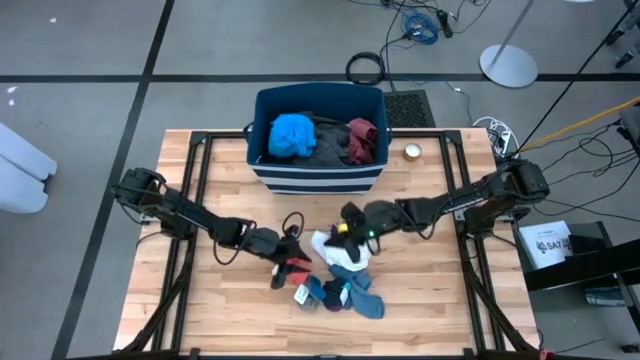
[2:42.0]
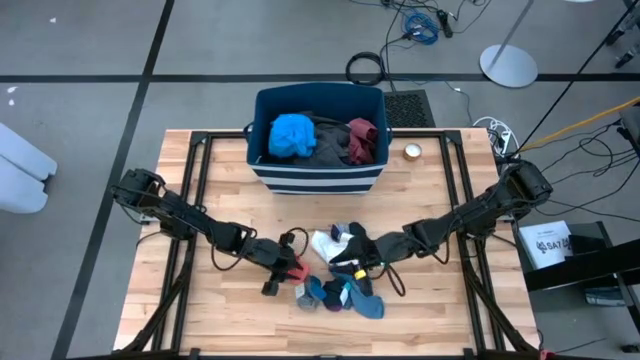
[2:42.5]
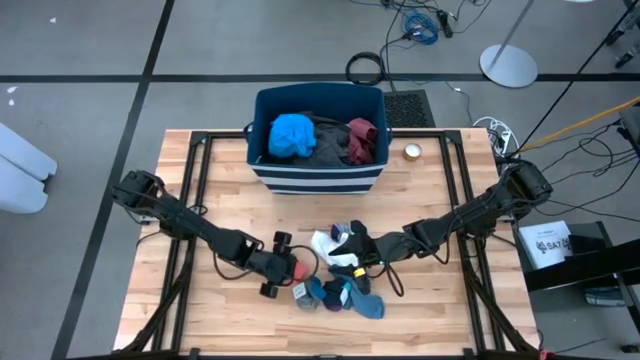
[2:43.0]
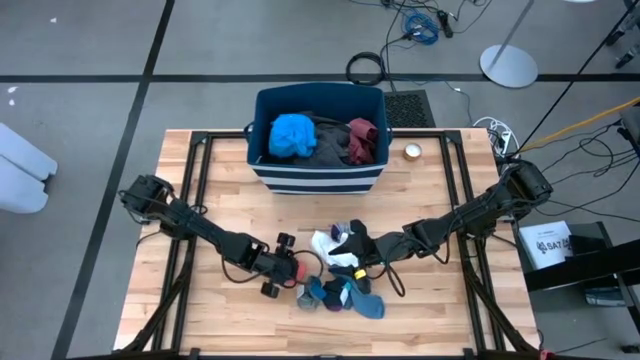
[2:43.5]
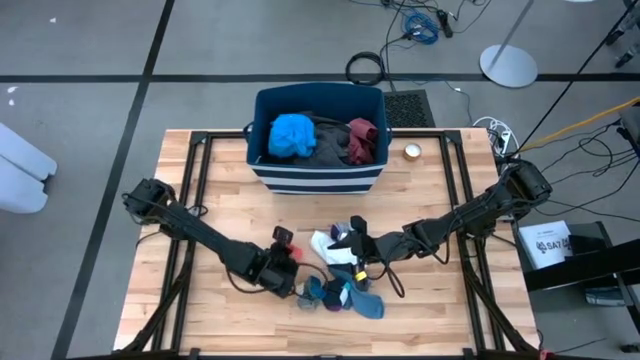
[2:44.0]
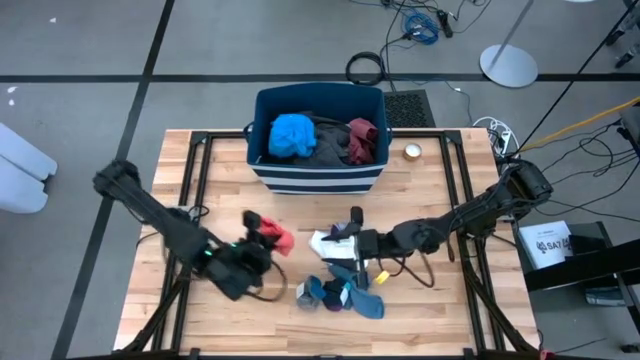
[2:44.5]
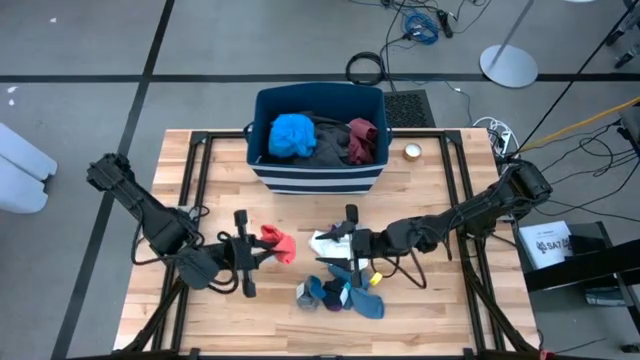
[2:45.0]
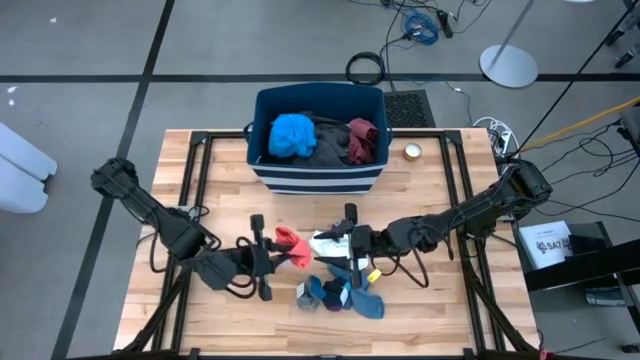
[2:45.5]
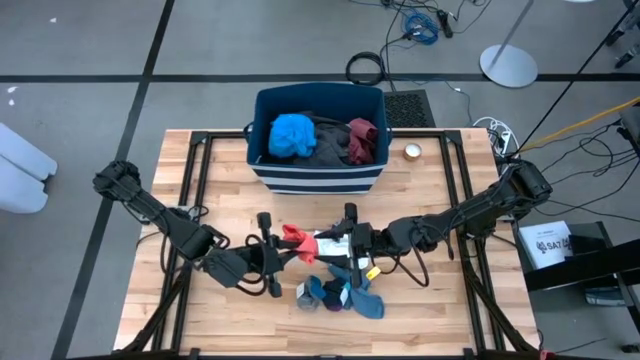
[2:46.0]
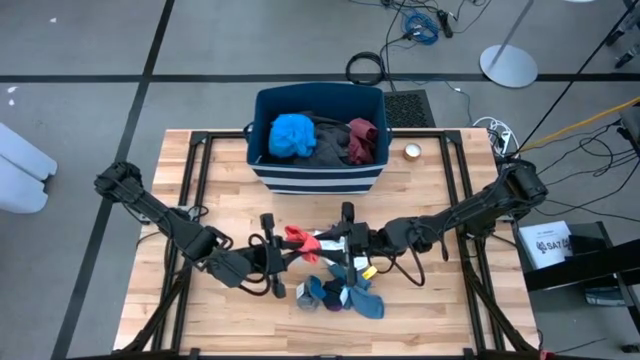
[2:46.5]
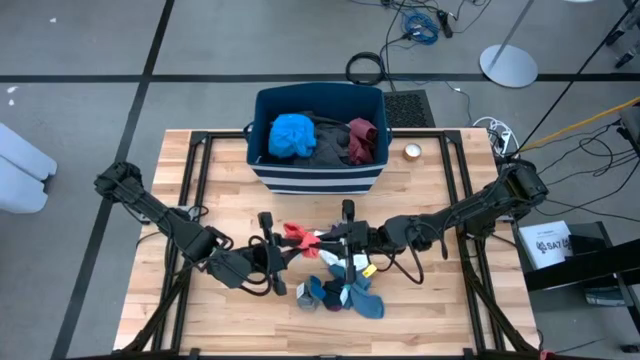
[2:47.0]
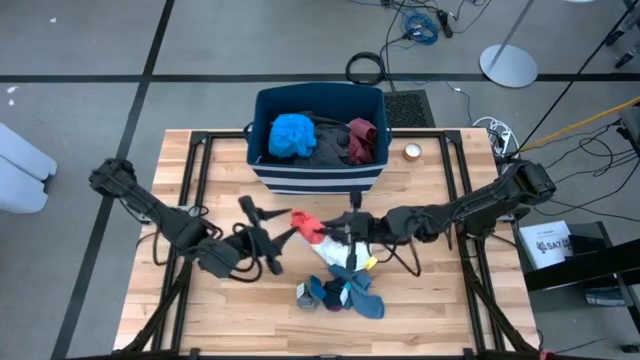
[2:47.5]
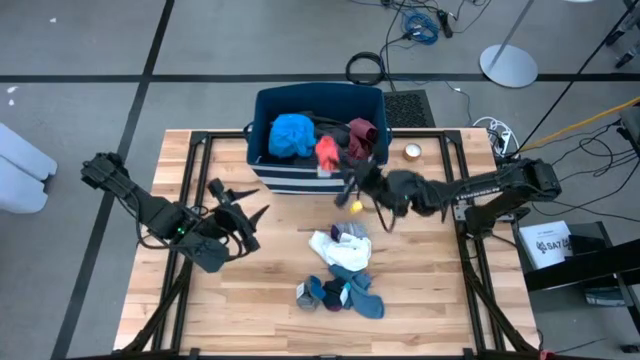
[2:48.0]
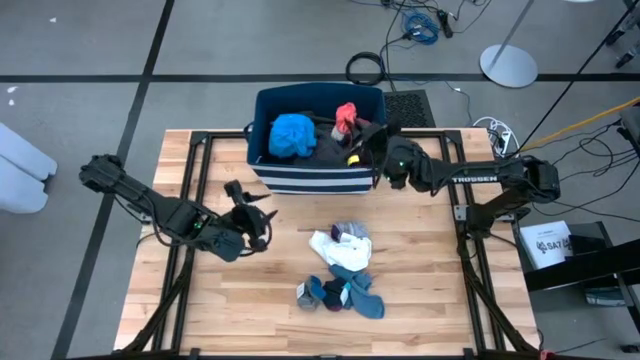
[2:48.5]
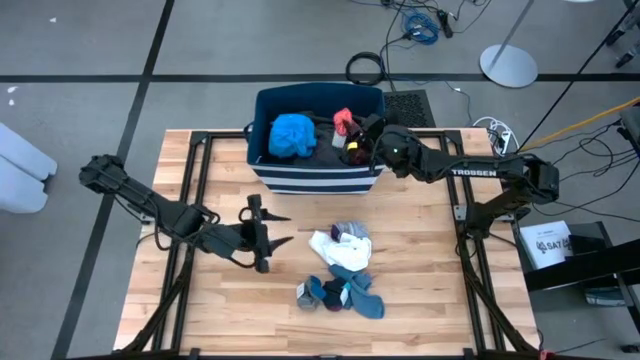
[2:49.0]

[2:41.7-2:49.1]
Task: Sort clothes
Put the orange sock into the blue laundry bin

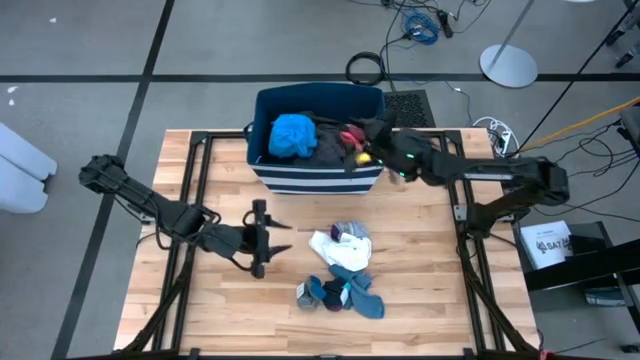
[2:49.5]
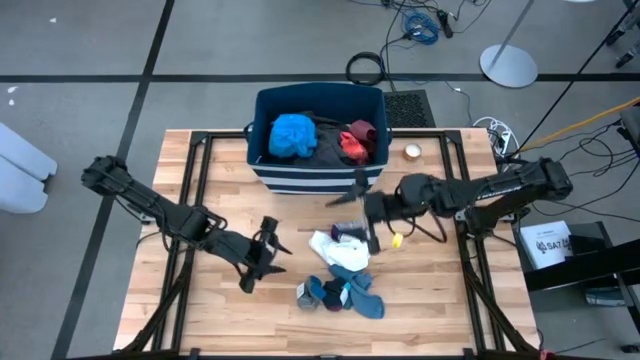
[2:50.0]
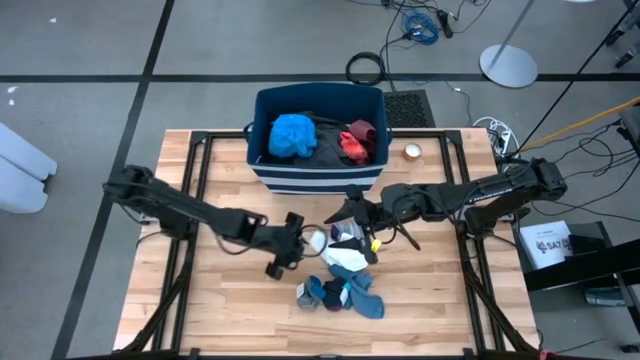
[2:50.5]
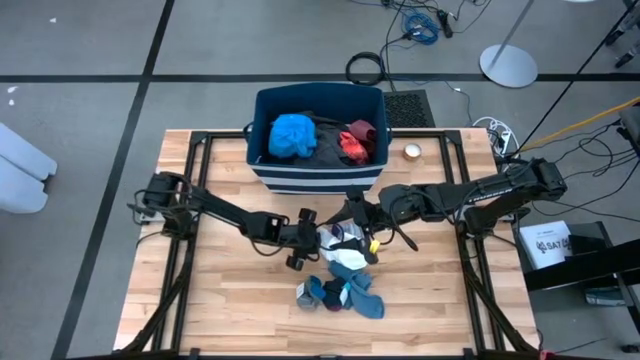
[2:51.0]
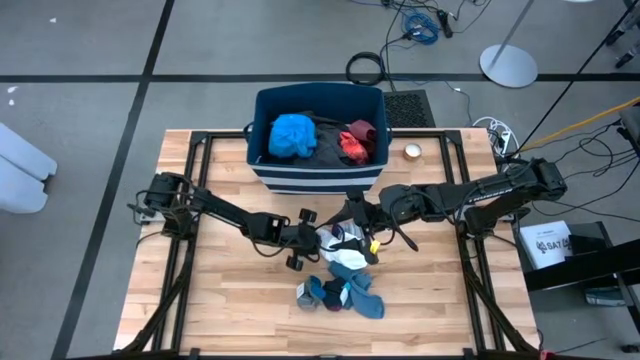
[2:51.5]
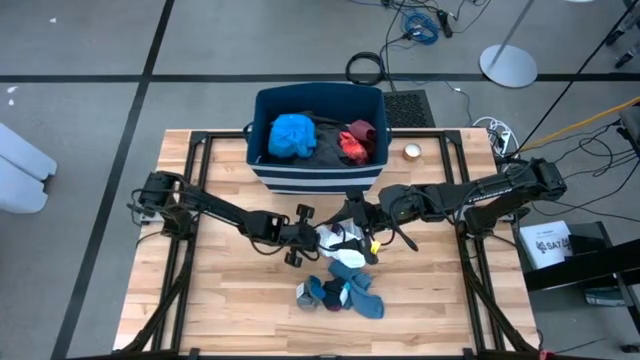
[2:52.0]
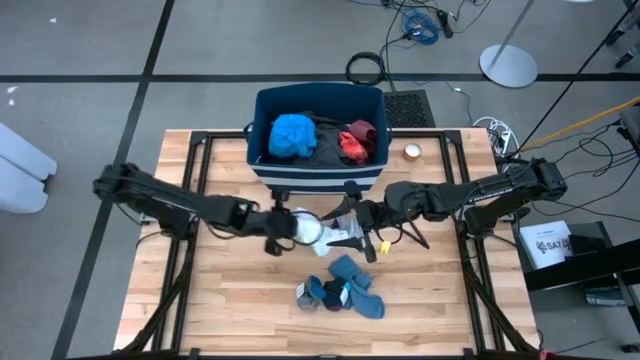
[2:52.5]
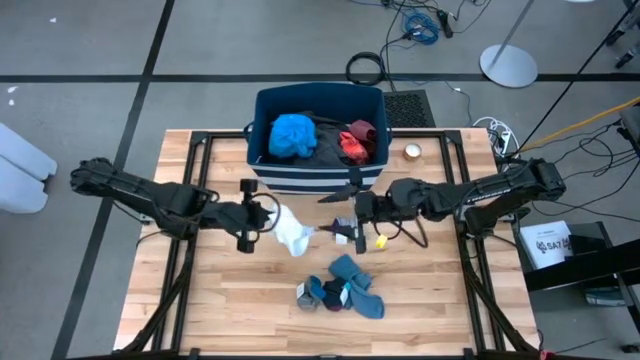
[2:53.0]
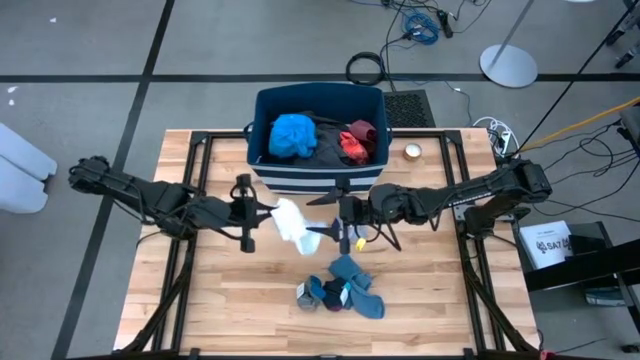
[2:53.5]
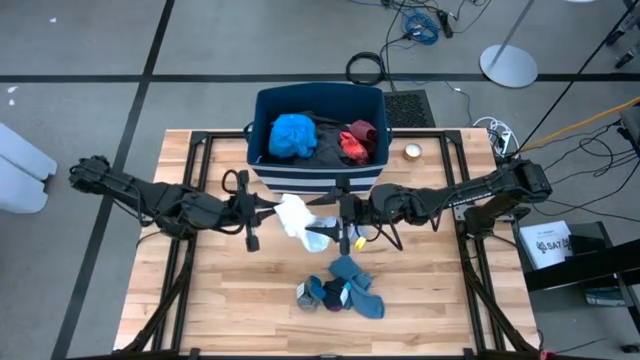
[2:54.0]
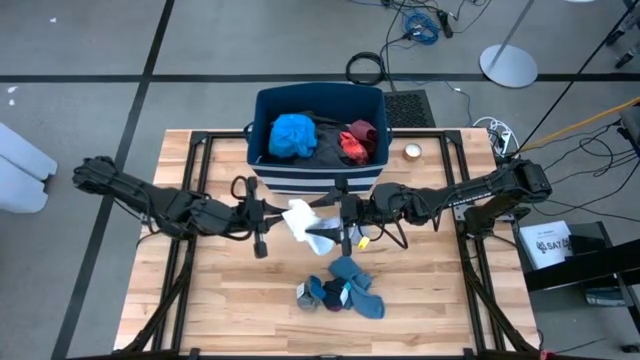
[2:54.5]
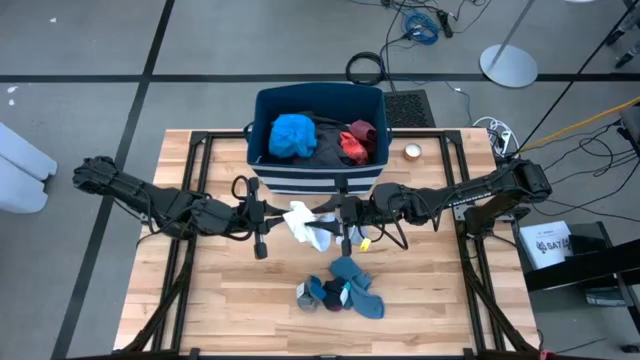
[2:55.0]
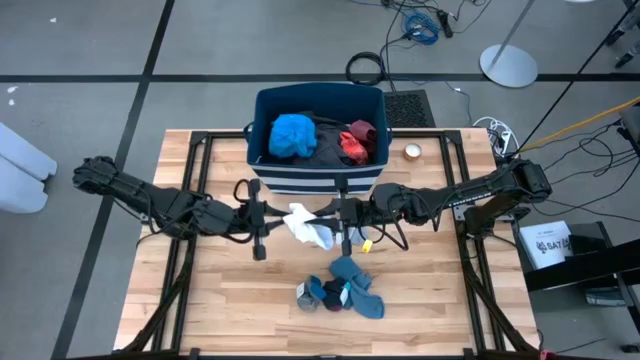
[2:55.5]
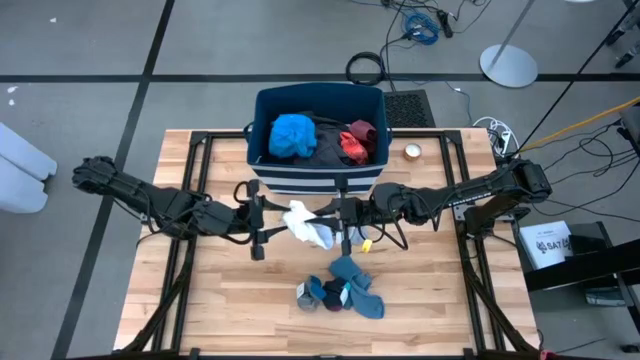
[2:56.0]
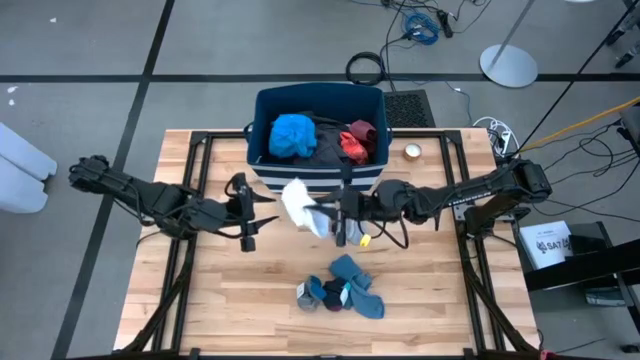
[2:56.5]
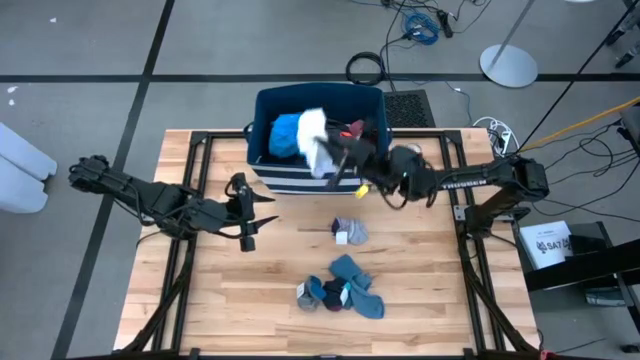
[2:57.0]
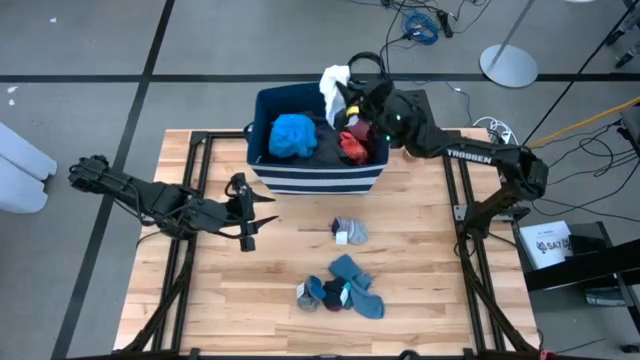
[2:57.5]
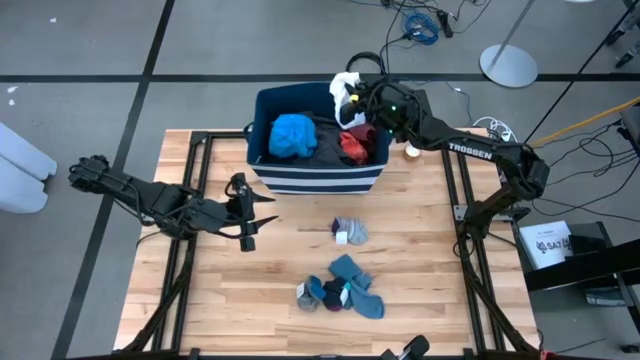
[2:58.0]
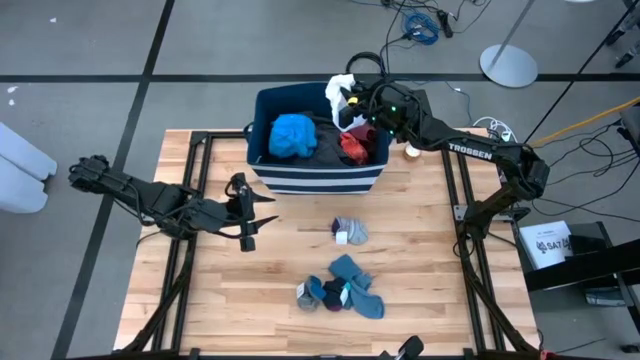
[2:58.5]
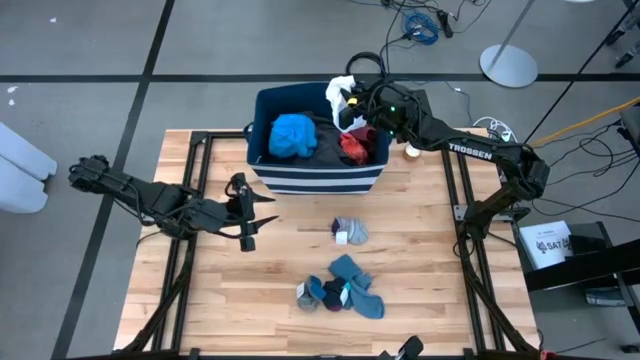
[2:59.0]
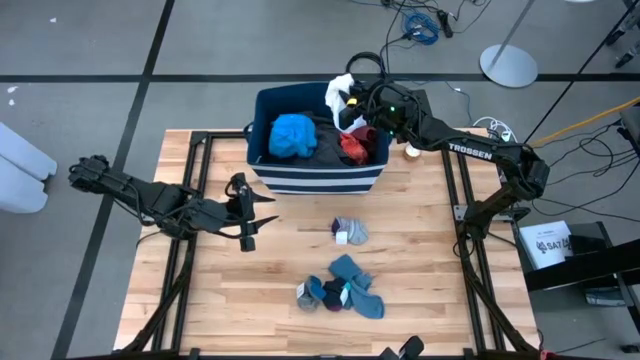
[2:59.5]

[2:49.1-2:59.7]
Put the white sock into the blue laundry bin

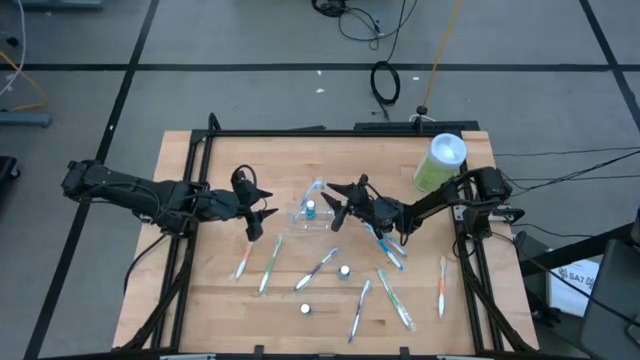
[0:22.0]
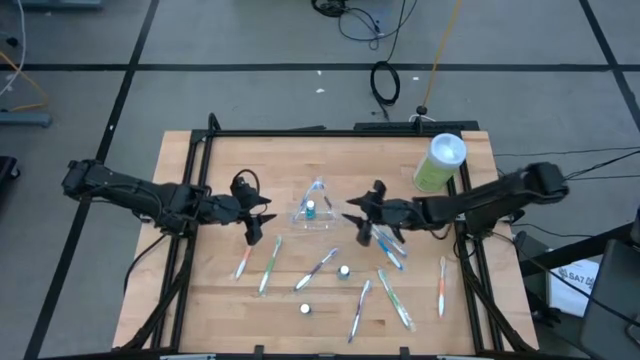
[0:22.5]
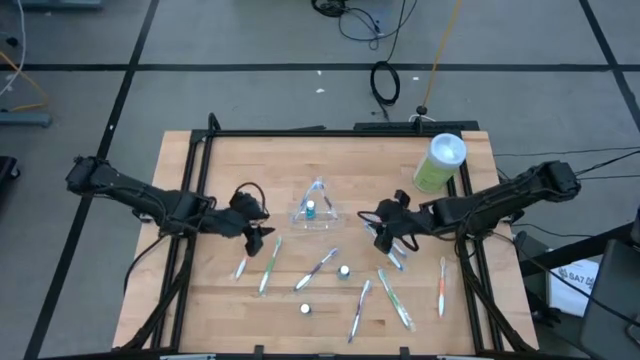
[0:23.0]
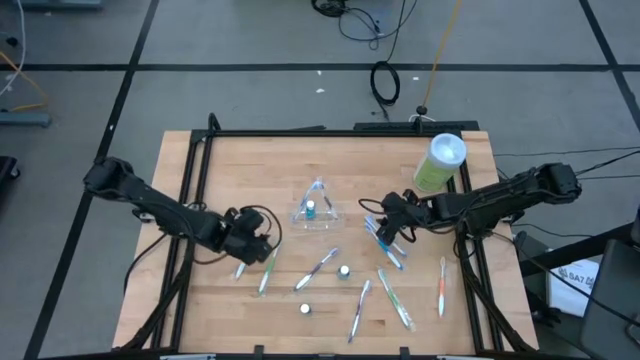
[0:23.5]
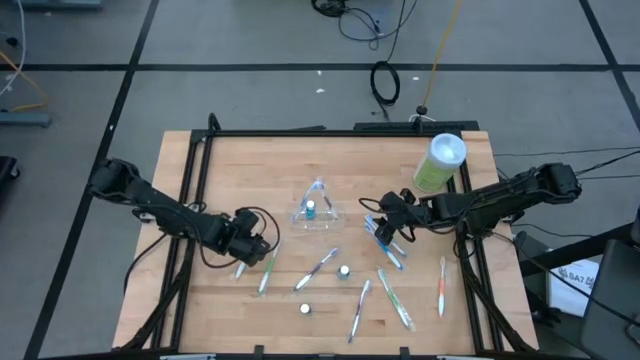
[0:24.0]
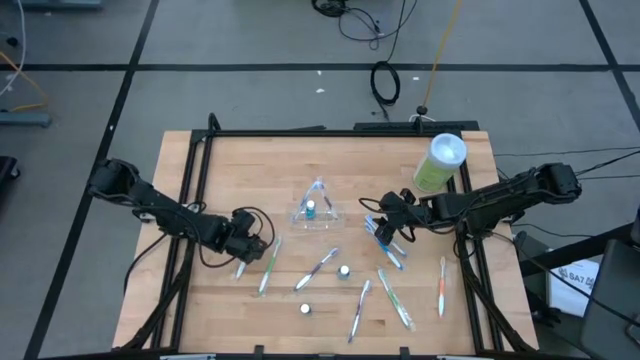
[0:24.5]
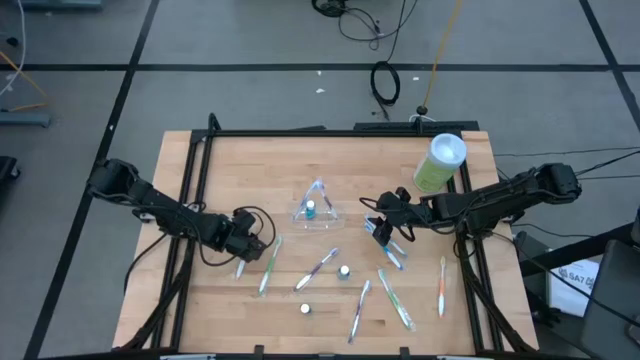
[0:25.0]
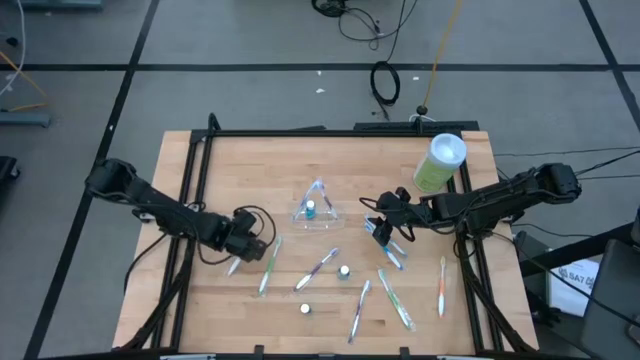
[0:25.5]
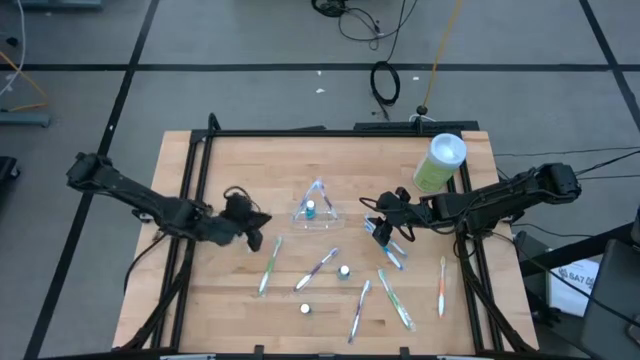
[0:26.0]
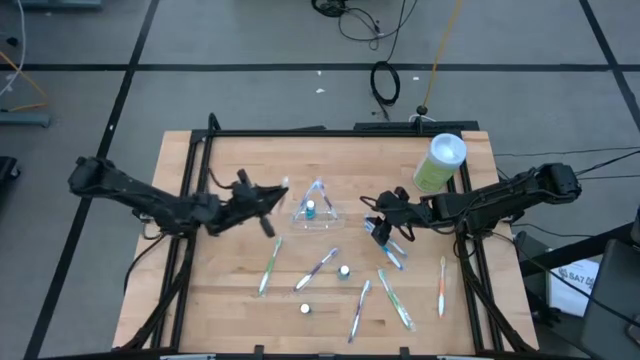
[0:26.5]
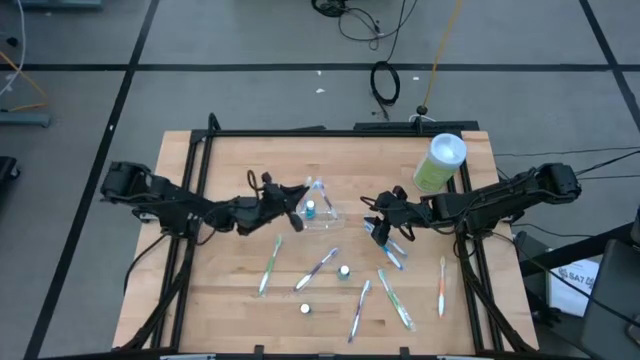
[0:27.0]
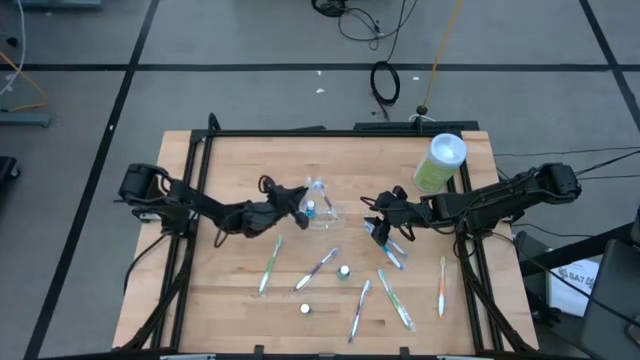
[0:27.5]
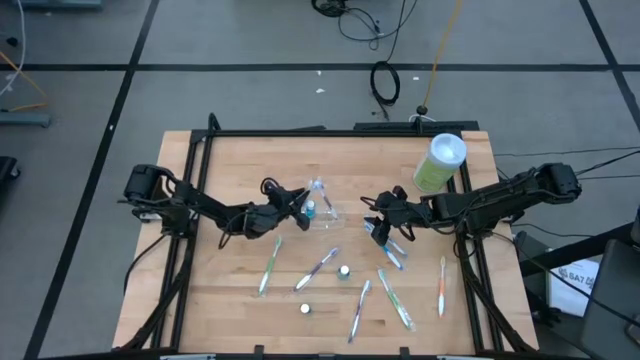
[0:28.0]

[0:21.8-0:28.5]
Task: Pick & Place toothbrushing station
Put the top orange toothbrush into the transparent organizer
